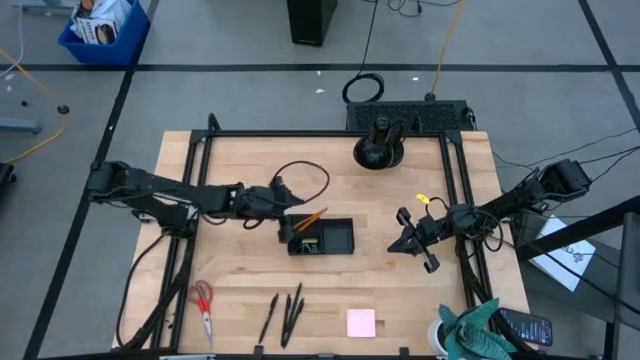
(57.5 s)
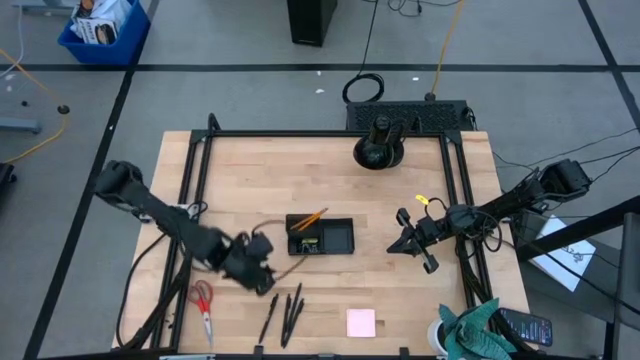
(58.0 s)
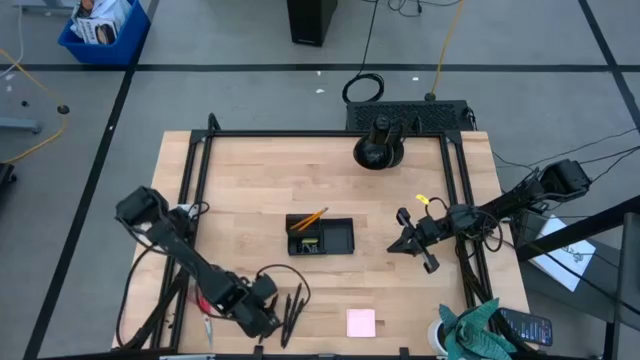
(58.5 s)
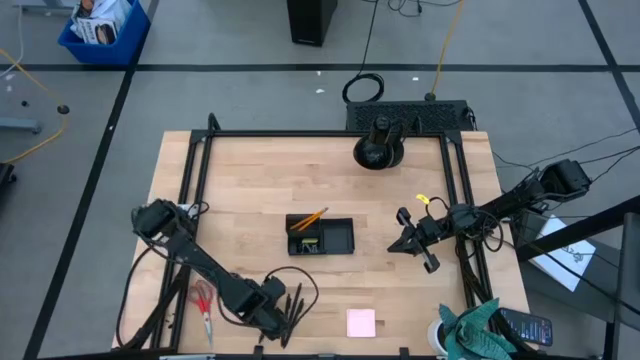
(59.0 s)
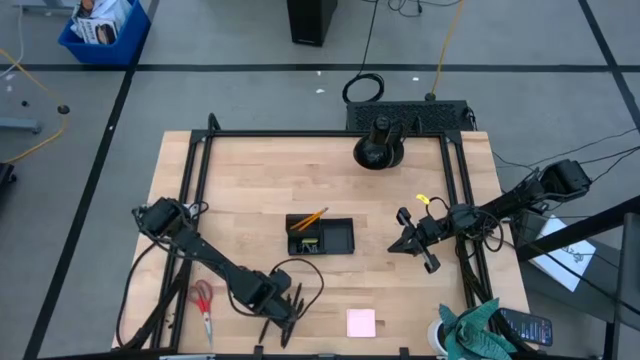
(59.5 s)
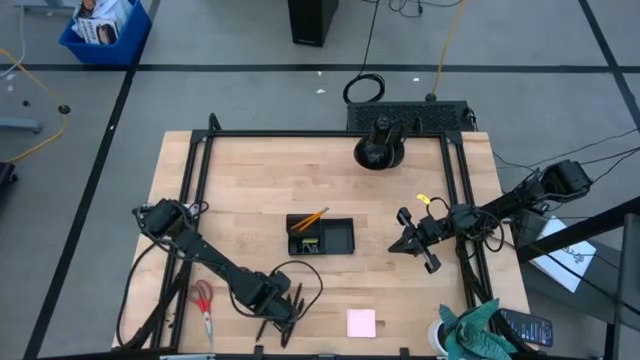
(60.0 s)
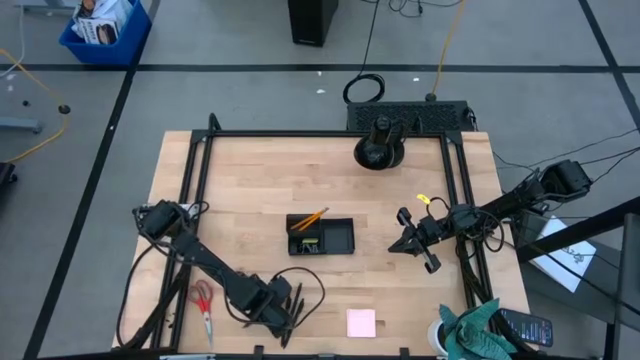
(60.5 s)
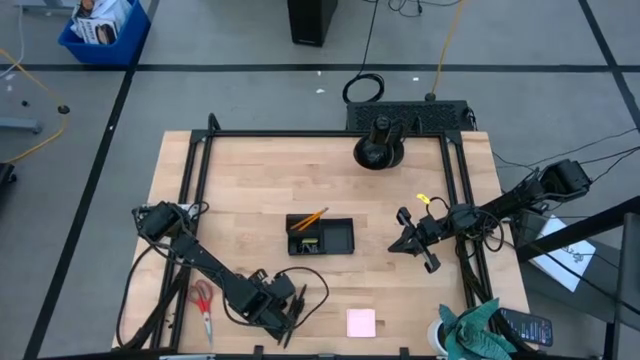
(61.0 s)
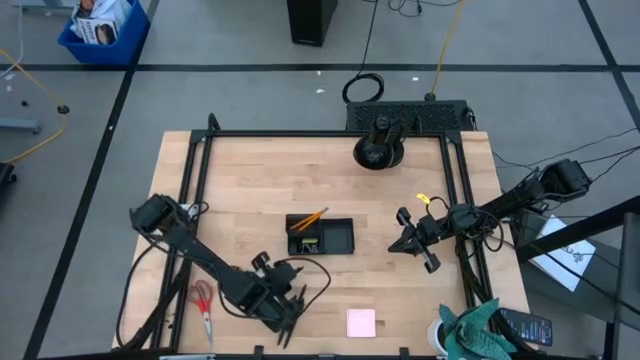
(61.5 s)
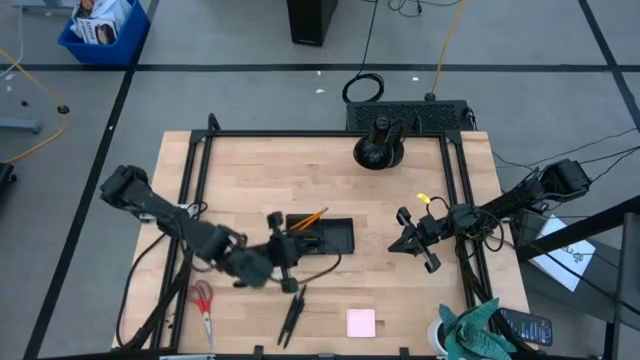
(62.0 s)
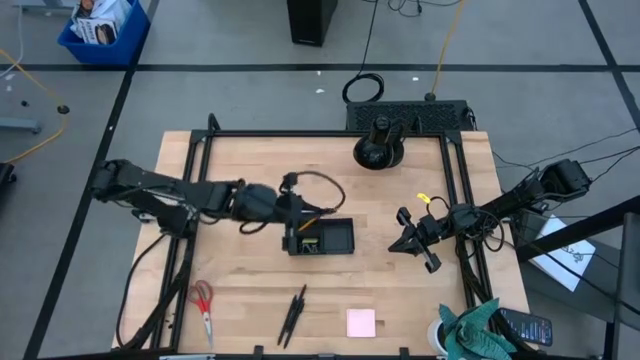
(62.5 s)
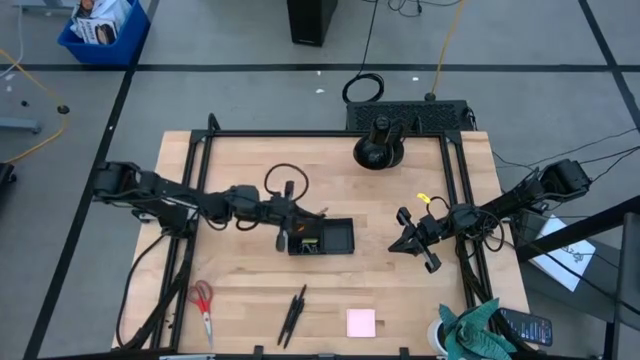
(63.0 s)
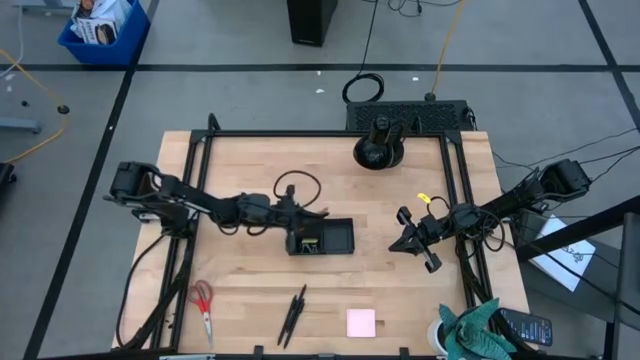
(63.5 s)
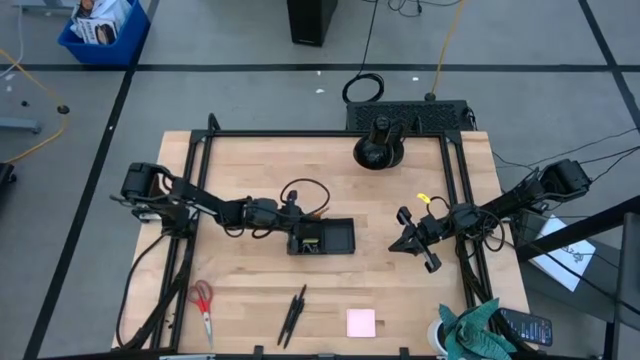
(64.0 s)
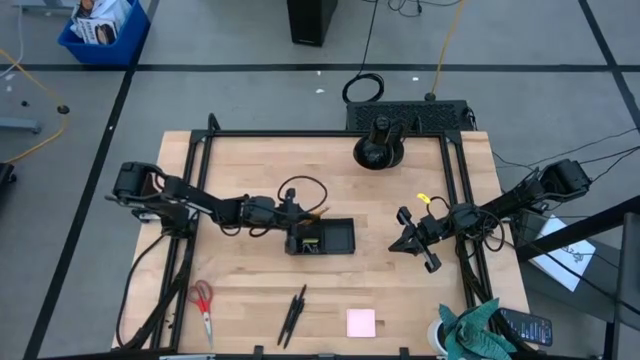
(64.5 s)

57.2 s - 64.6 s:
Task: Pick and place office supplies into organizer
Put the black pen into the black desk organizer

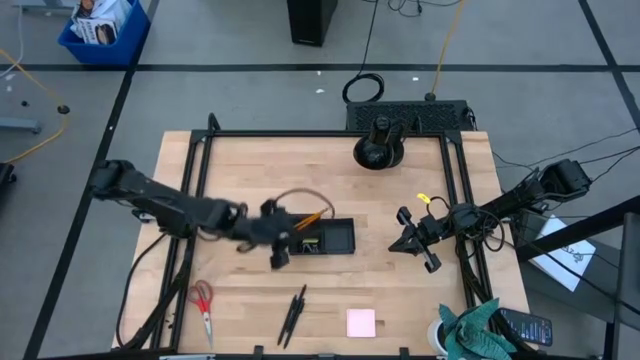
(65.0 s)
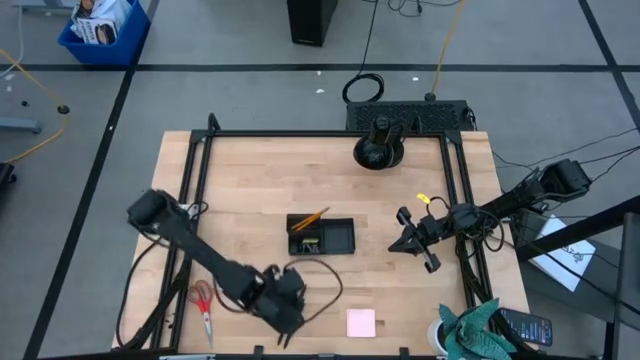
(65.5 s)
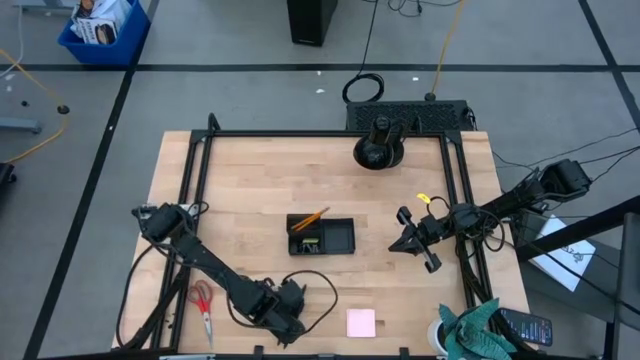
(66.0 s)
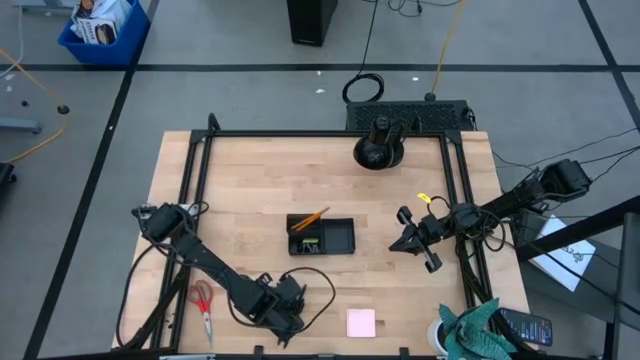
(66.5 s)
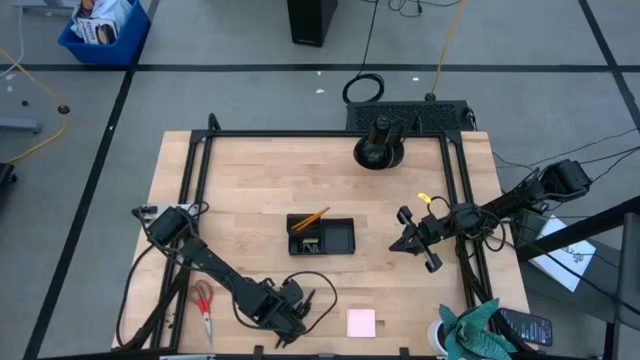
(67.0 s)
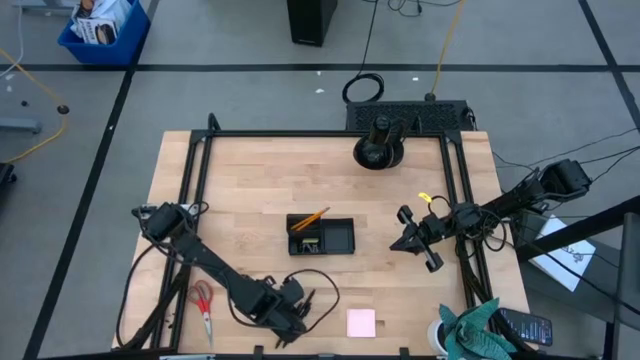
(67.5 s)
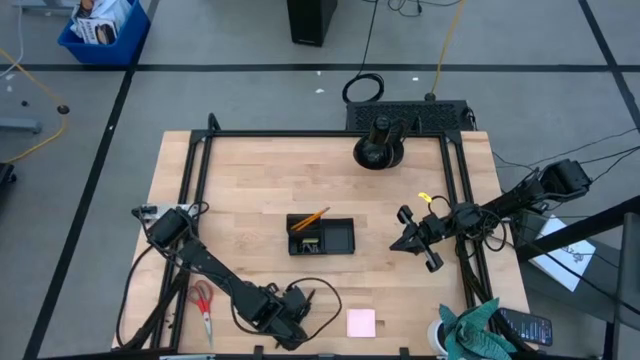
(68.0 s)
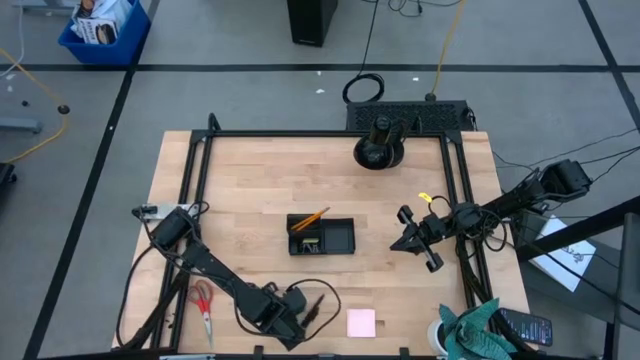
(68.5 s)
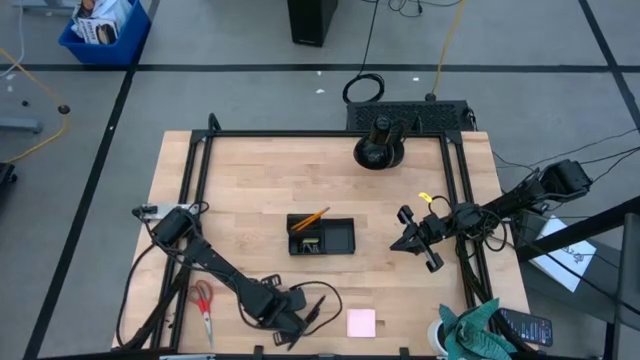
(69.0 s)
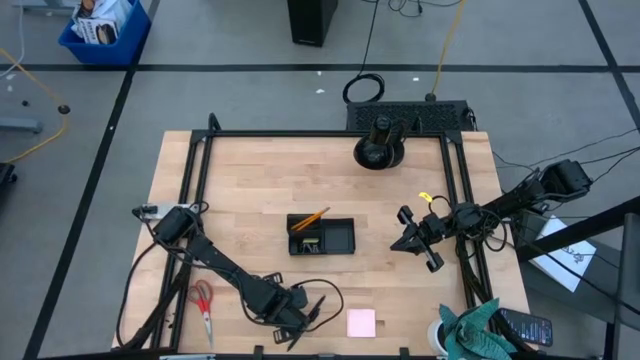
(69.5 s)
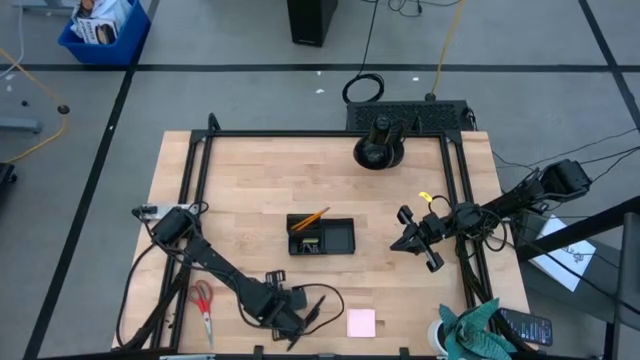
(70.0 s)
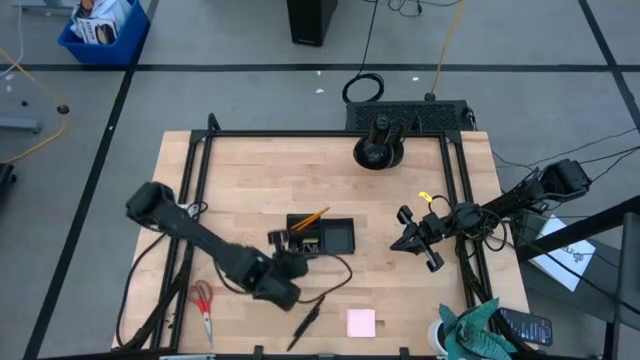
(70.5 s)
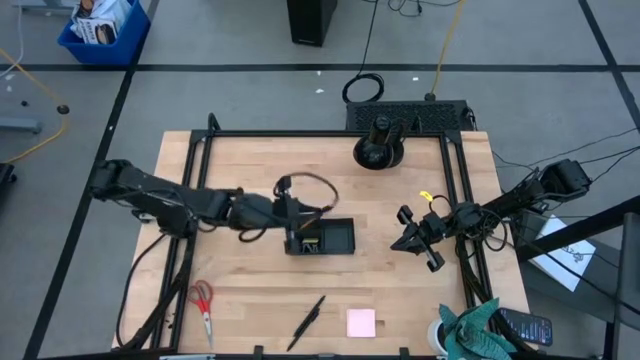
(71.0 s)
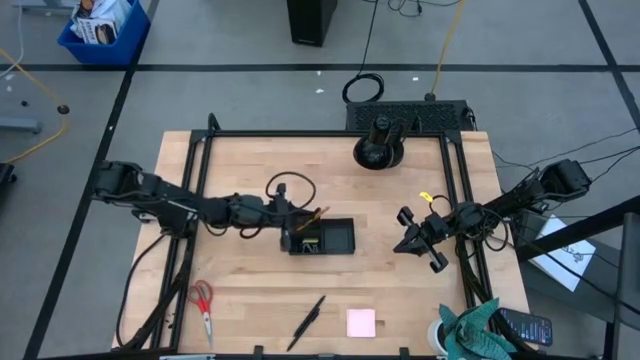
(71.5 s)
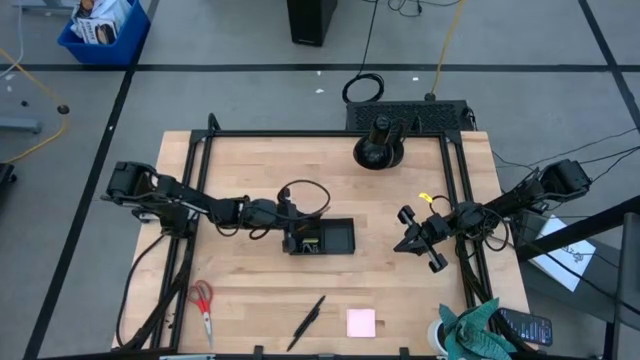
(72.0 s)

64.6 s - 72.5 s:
Put the black pen into the black desk organizer

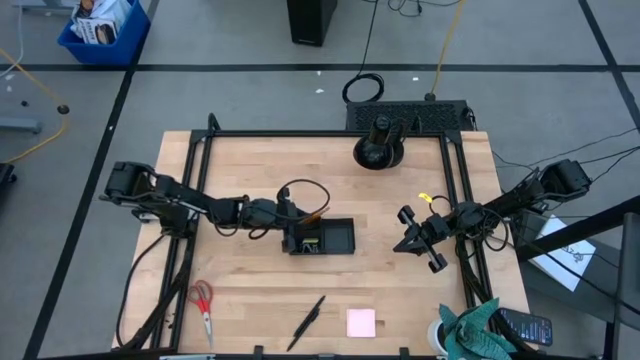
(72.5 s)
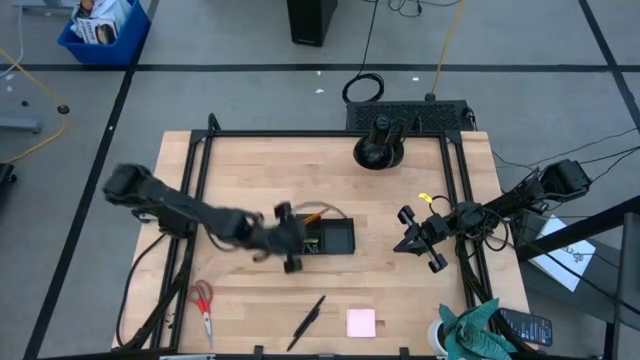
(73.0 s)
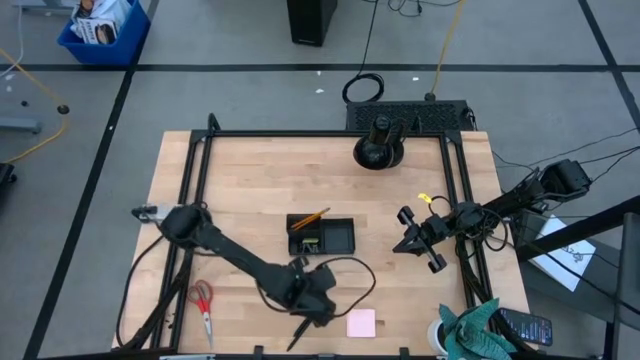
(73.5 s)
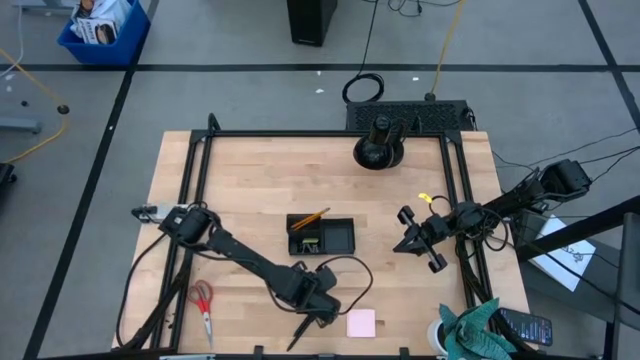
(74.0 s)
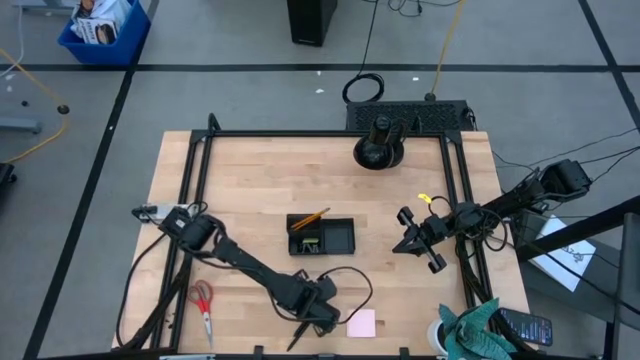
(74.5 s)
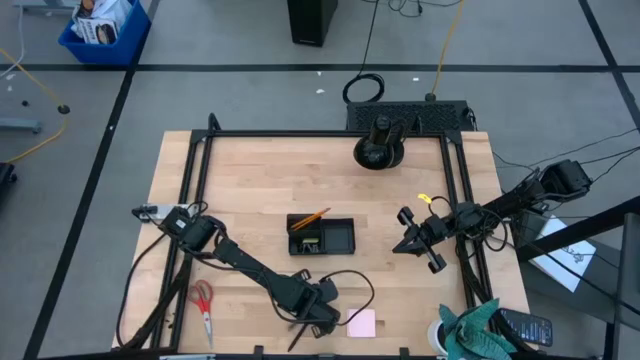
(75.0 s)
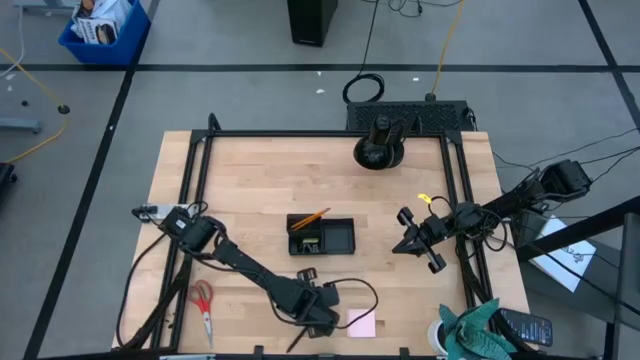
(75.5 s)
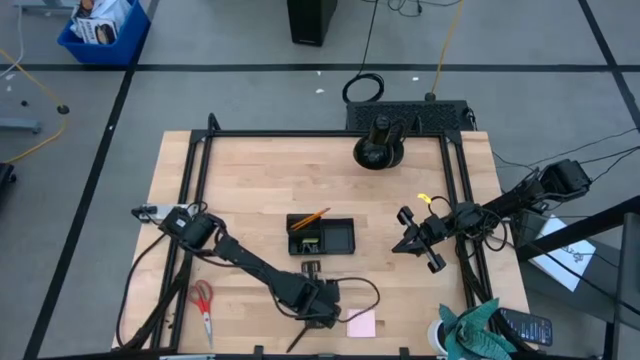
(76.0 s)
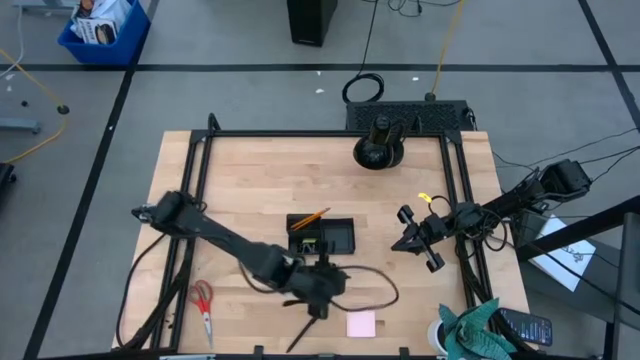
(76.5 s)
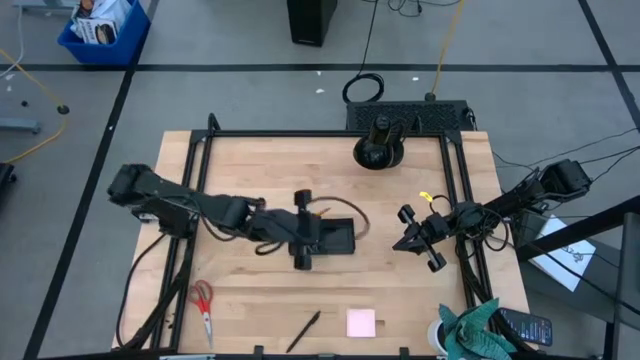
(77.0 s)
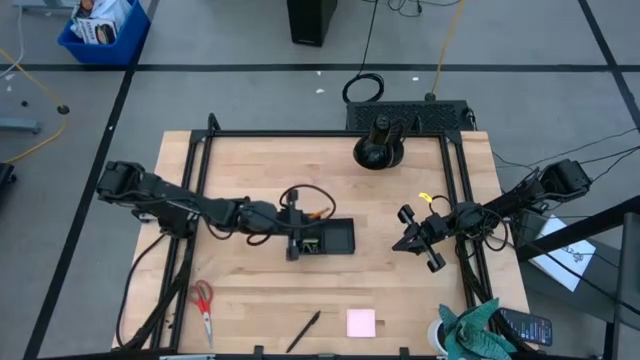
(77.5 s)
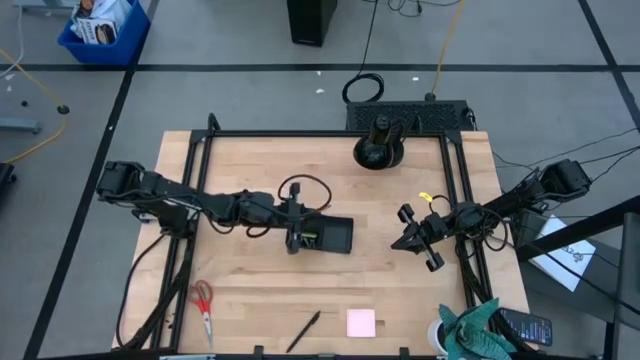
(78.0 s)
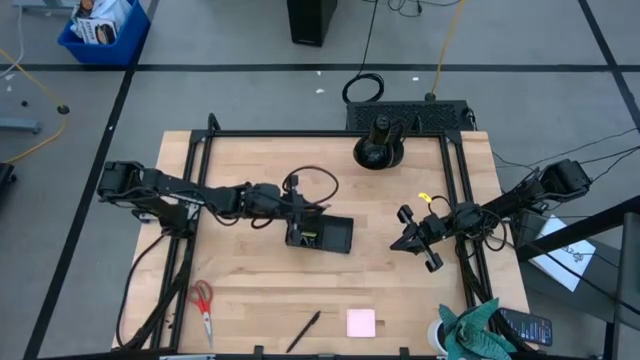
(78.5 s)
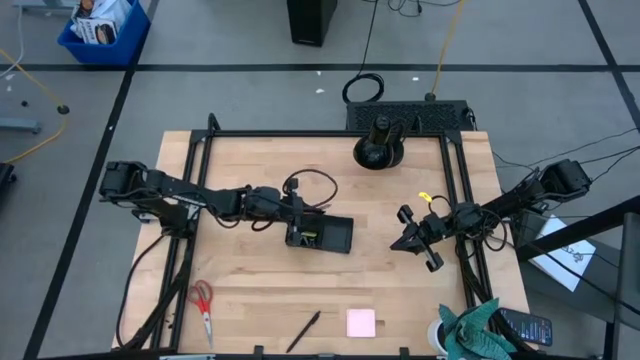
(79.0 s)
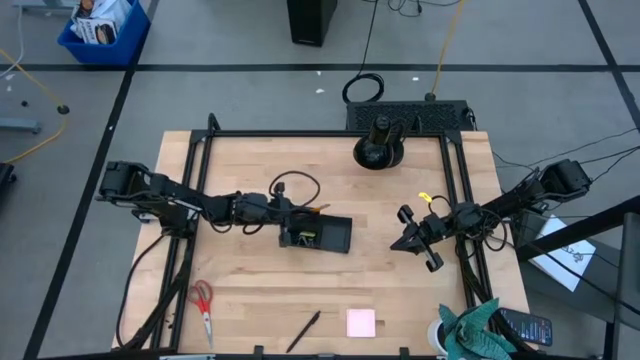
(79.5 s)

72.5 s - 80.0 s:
Put the black pen into the black desk organizer
